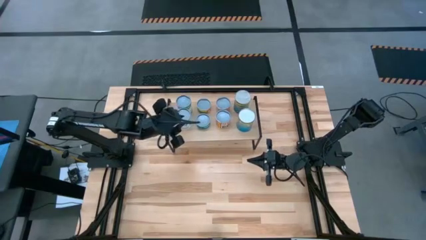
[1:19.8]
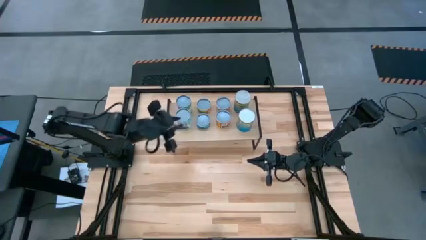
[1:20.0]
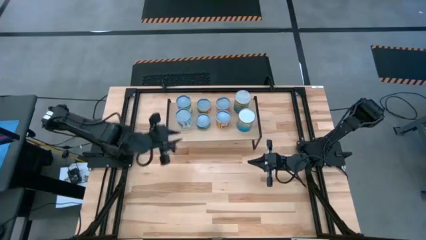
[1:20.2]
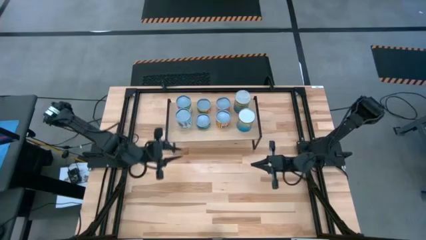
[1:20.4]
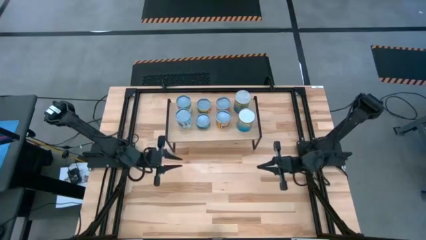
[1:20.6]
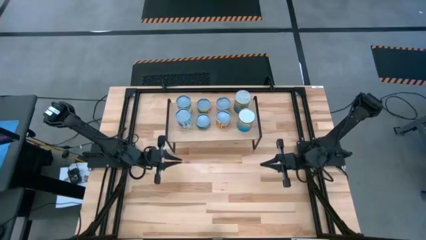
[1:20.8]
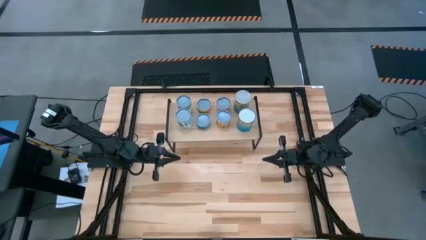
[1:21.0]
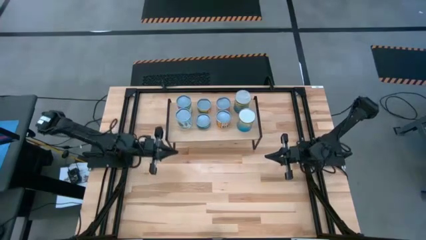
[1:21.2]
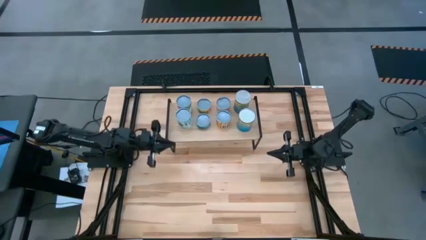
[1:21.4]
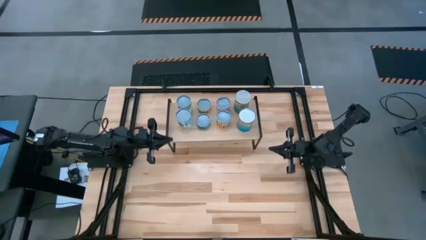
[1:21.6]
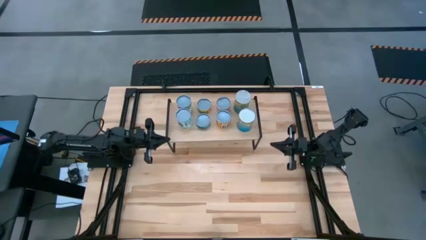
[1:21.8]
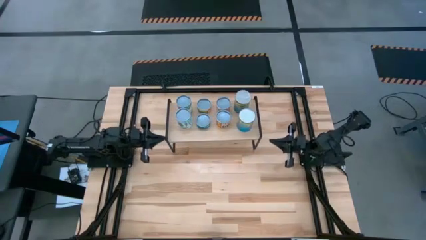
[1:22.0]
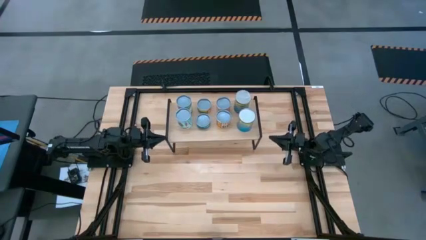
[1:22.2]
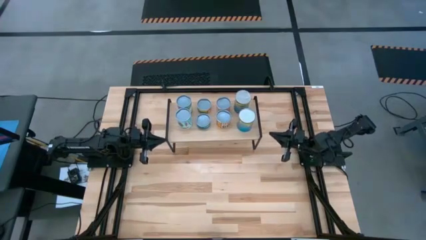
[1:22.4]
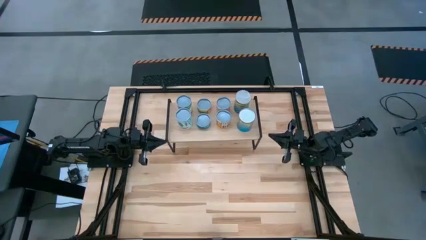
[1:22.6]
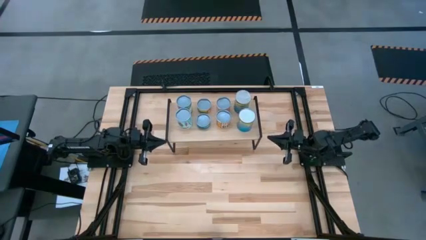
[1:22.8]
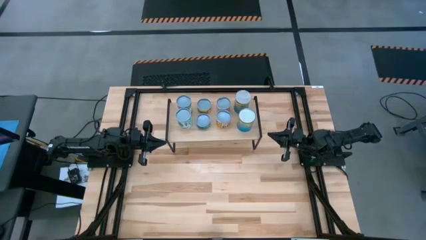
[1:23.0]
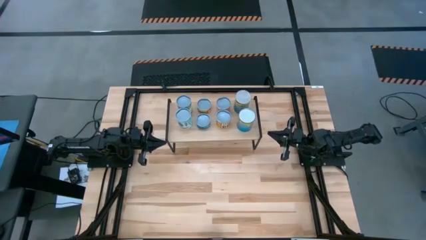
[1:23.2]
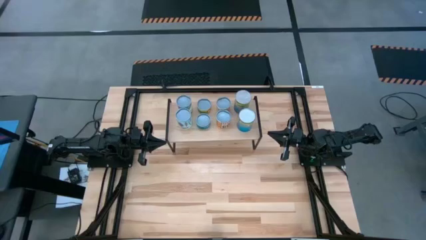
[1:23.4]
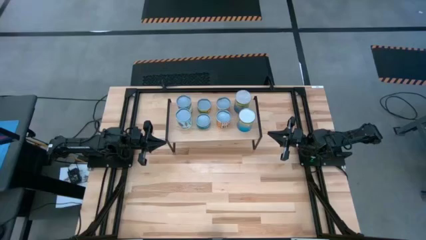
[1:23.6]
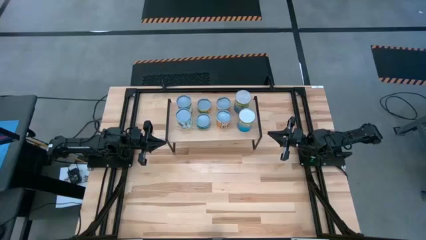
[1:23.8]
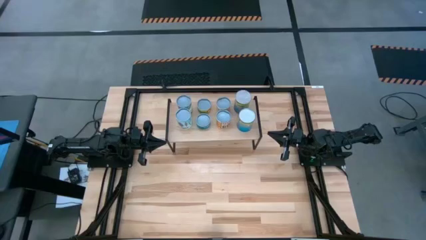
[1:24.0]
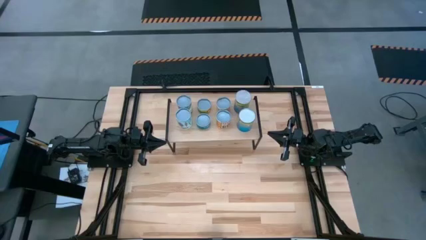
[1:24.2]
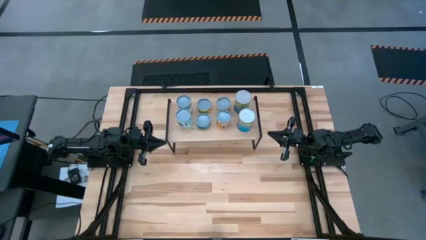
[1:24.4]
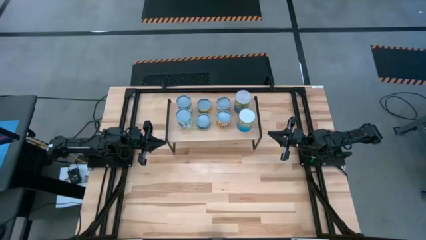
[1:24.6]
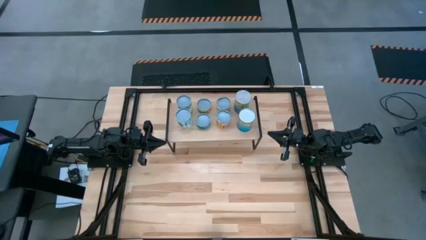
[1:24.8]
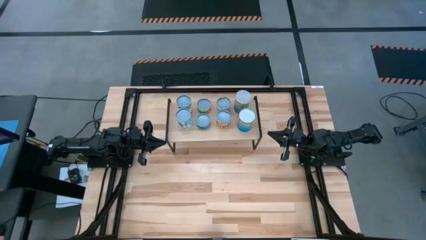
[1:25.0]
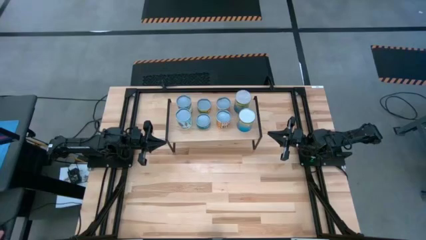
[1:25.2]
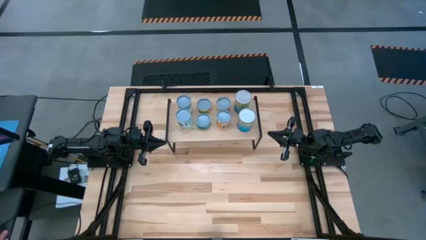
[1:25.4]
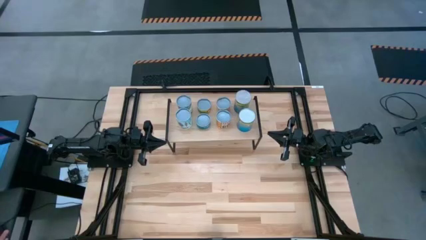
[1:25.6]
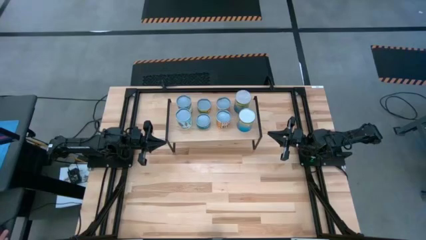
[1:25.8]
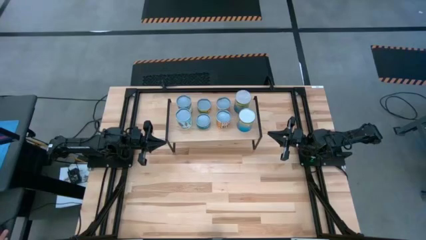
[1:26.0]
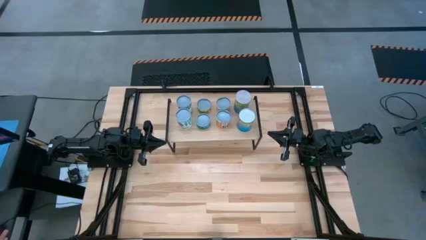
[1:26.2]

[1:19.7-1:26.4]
Task: Pick and place cans onto a shelf
Return to Home Position

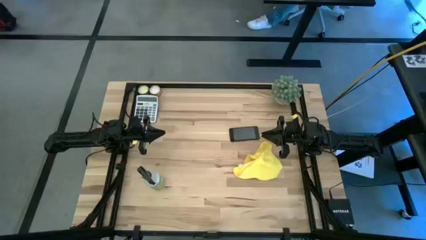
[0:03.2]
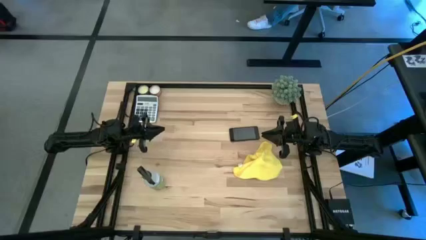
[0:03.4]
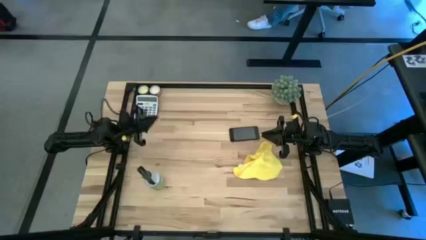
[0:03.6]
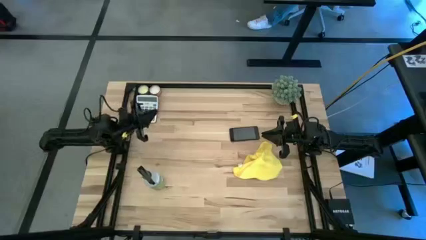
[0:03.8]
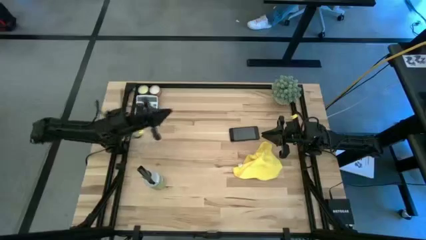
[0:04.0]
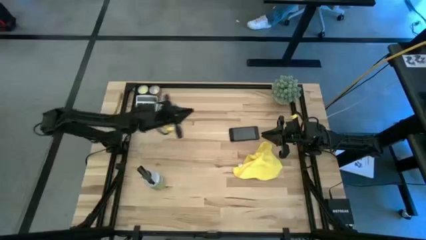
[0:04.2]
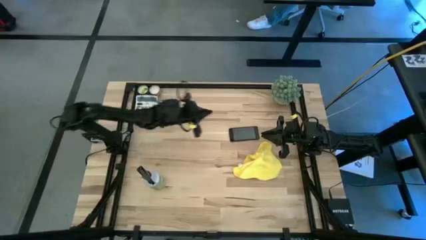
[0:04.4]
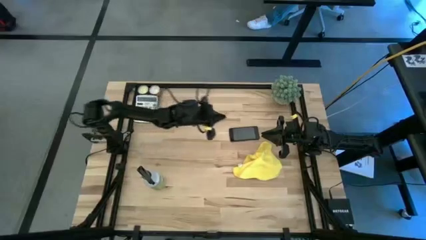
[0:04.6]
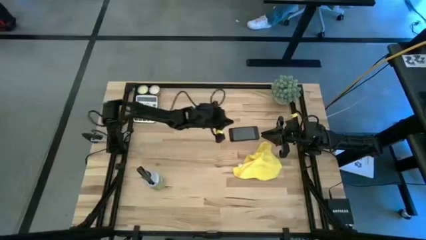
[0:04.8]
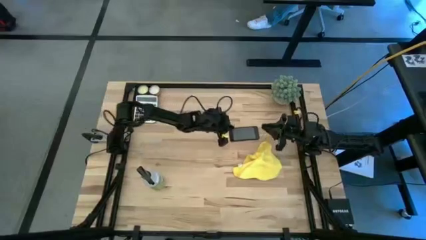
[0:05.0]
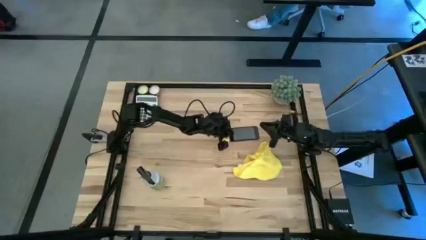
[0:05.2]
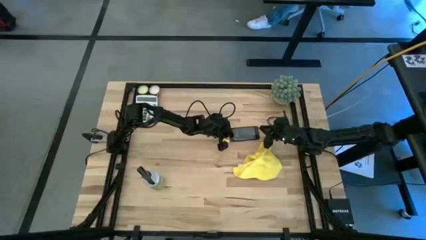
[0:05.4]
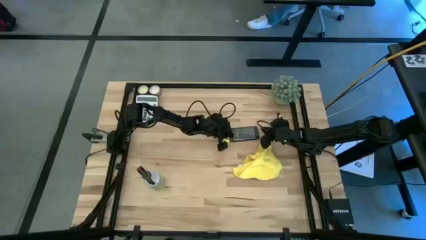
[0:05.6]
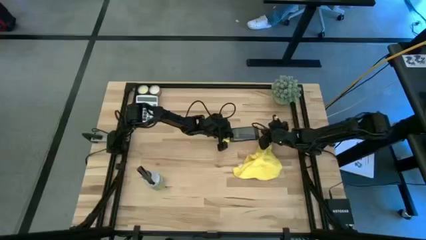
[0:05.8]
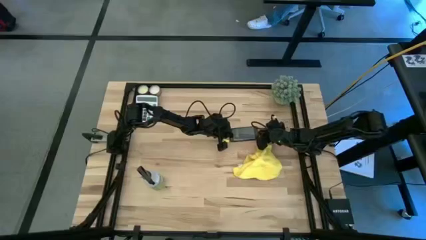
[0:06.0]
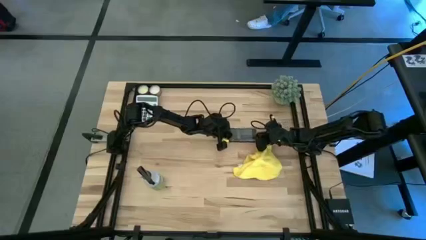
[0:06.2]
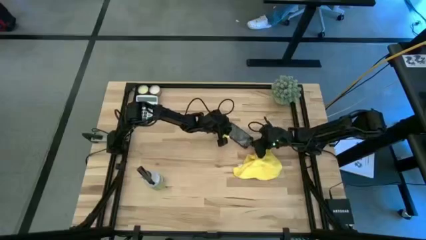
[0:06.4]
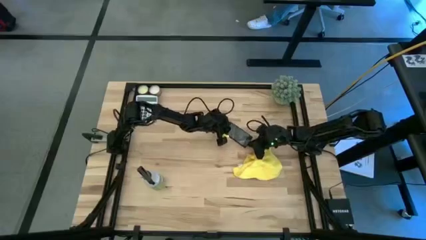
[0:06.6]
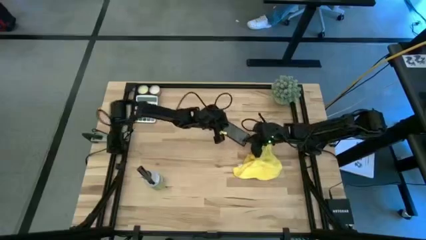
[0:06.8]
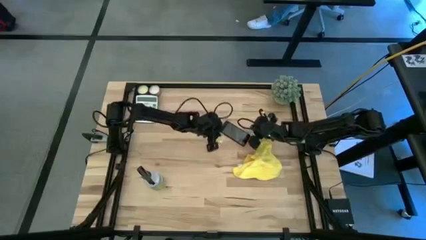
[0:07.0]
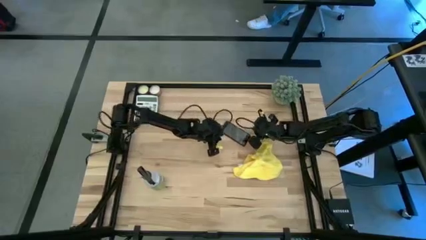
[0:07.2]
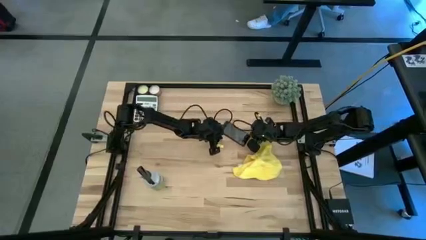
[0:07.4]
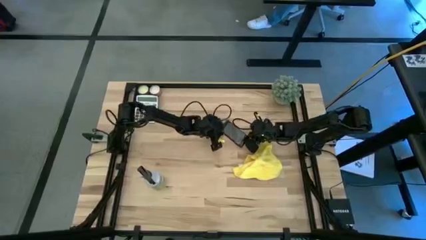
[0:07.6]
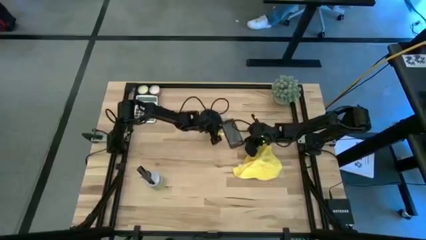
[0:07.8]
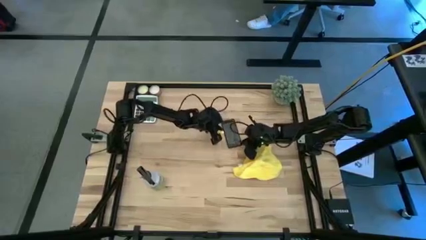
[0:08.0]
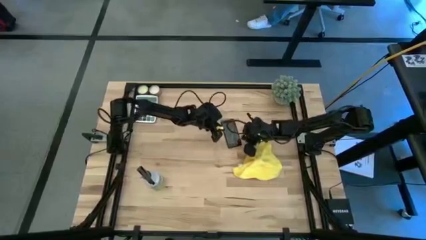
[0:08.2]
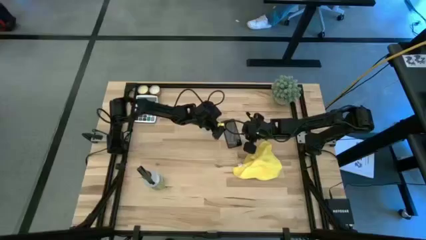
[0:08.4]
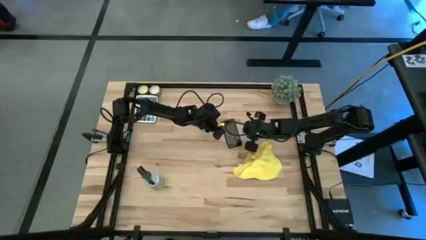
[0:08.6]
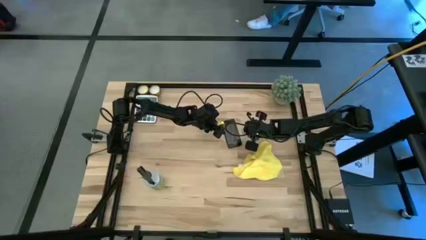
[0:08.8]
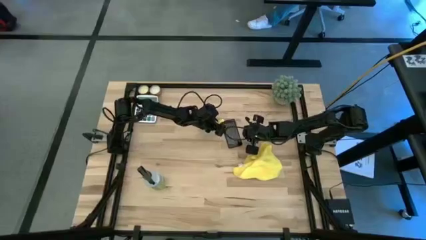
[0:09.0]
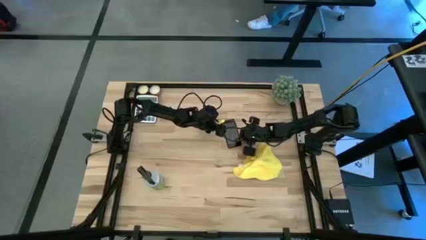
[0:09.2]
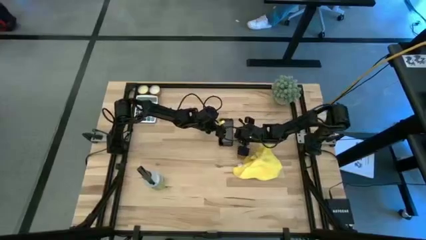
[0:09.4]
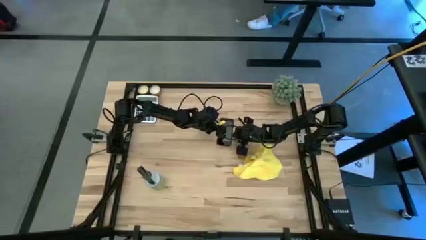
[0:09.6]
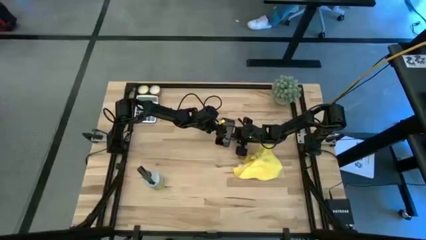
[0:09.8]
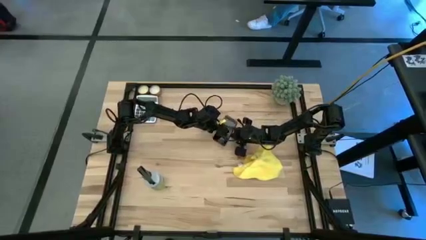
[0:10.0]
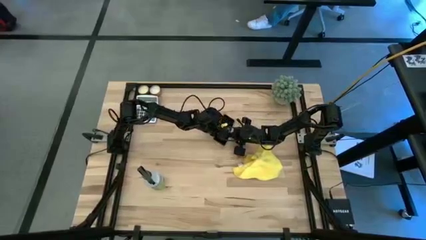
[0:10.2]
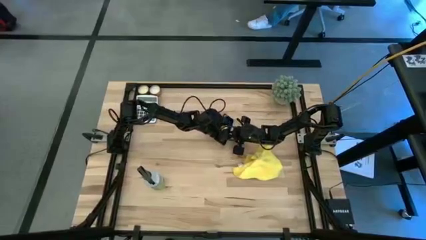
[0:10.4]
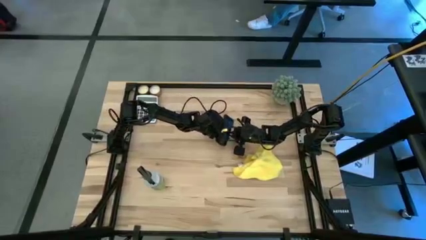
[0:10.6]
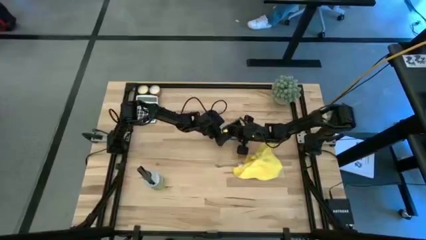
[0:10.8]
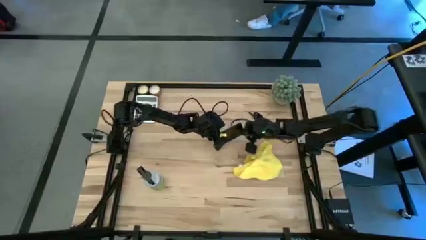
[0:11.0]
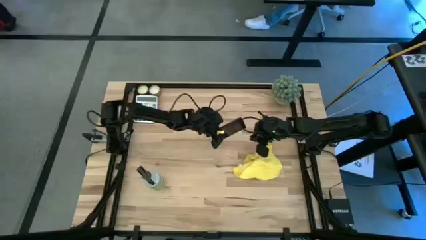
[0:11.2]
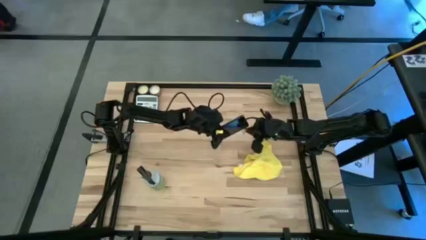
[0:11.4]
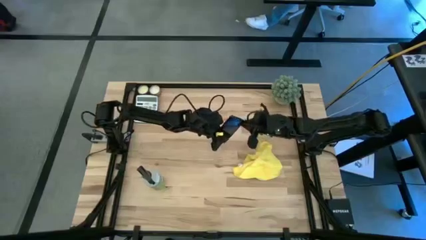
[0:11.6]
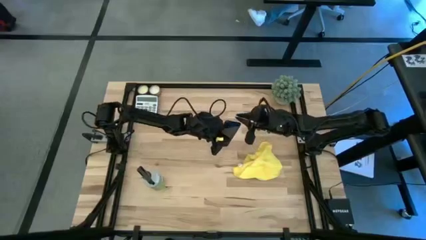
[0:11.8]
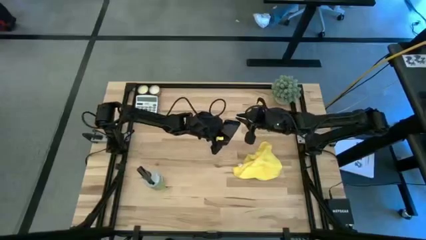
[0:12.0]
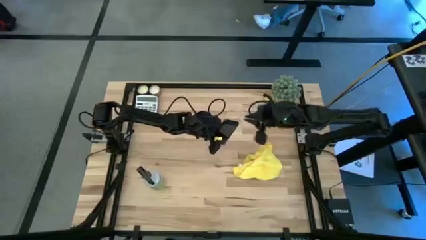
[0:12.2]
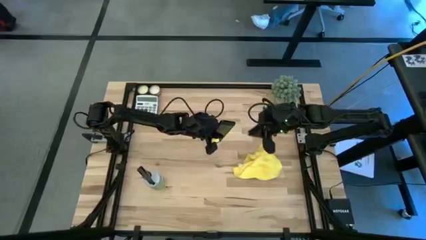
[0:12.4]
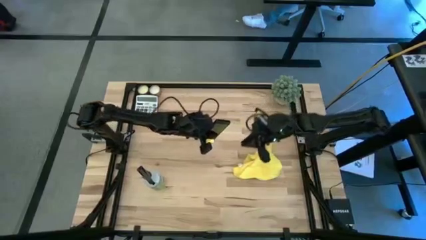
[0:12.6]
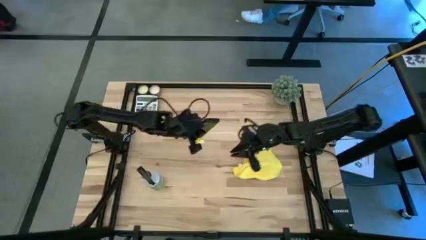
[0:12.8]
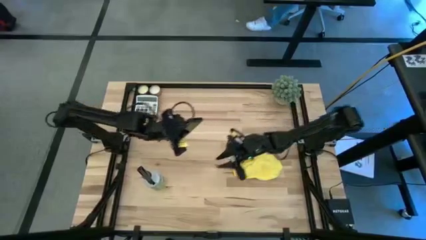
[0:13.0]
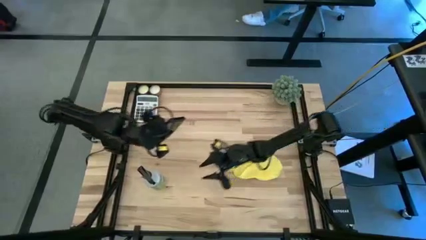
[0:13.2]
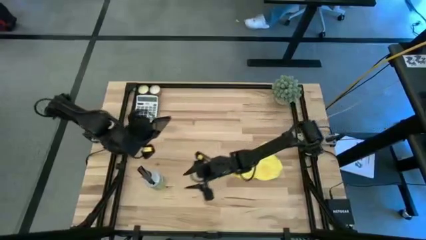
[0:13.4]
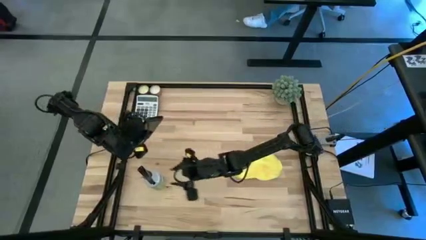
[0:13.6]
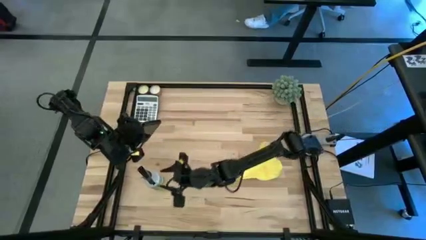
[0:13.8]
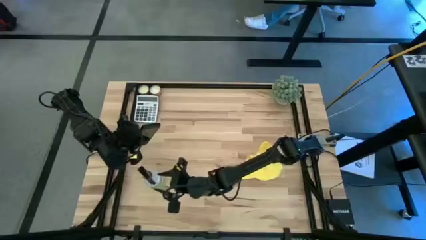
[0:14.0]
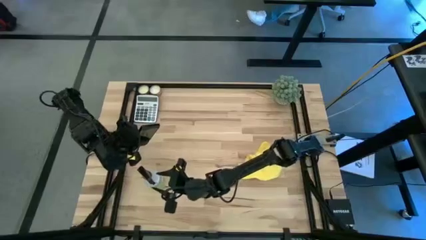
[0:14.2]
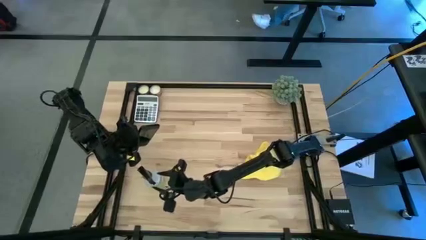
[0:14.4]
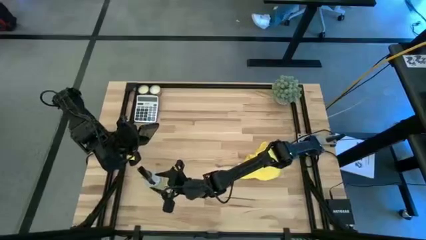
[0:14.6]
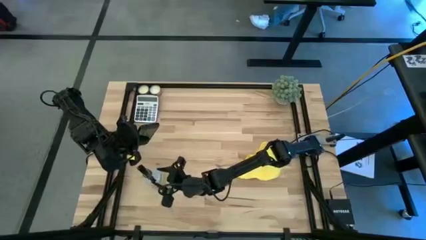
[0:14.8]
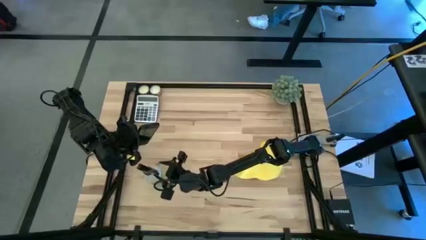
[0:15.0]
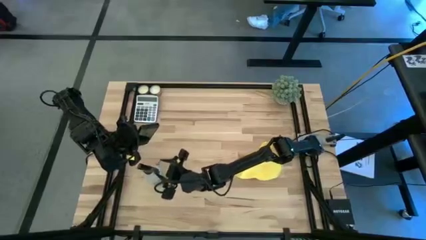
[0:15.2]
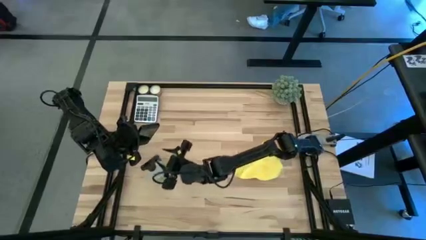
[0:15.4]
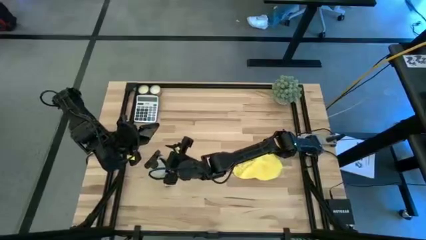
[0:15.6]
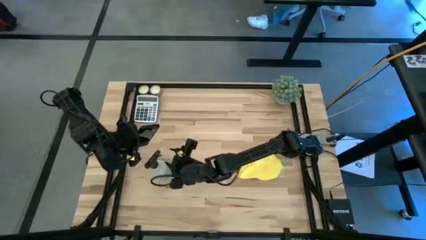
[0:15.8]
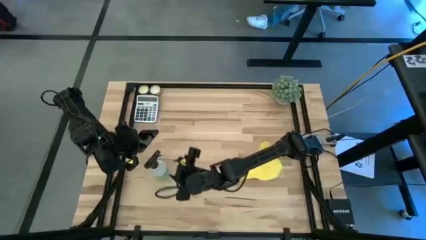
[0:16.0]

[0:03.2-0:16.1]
Task: Apply microfiber cloth
Spray the black cellphone screen using the white spray bottle
